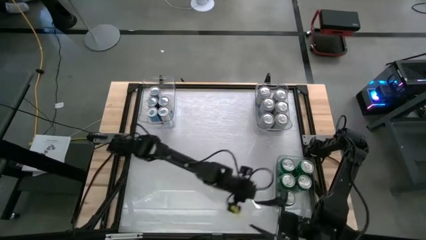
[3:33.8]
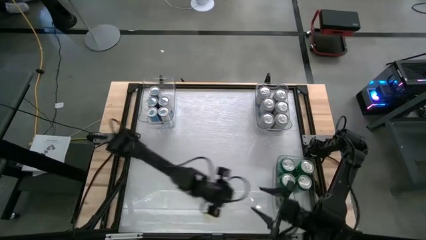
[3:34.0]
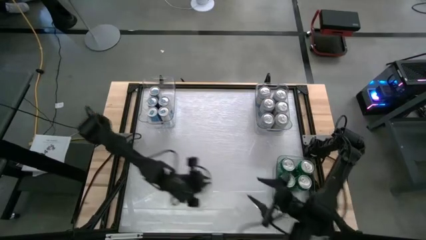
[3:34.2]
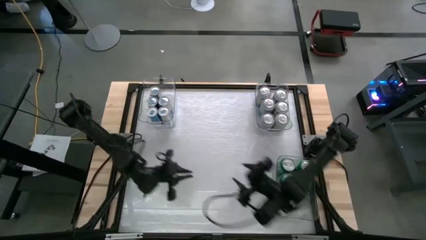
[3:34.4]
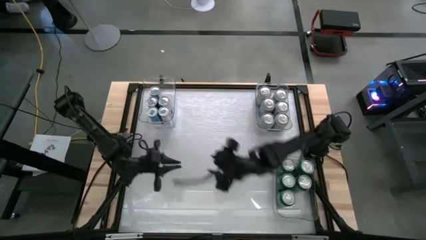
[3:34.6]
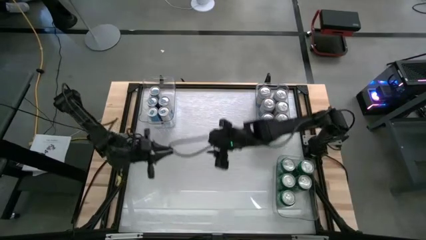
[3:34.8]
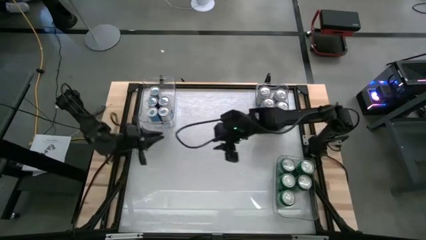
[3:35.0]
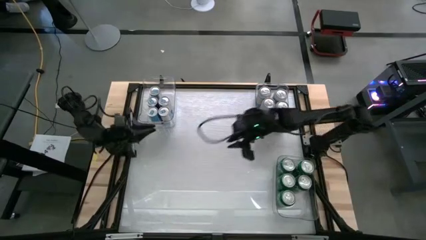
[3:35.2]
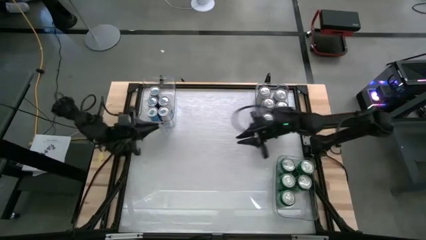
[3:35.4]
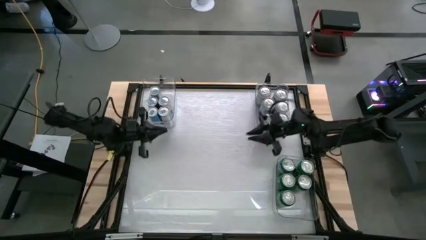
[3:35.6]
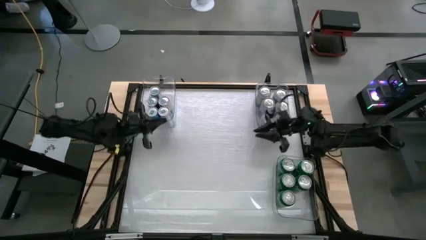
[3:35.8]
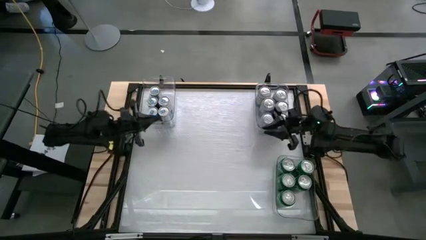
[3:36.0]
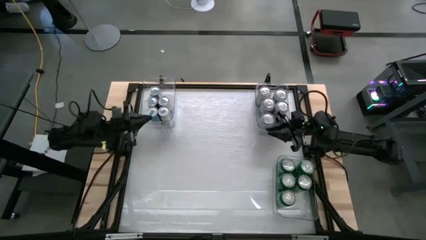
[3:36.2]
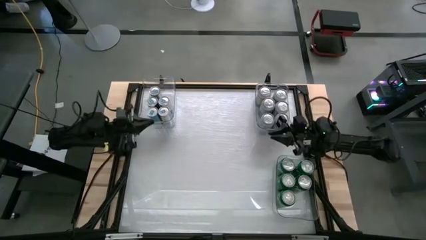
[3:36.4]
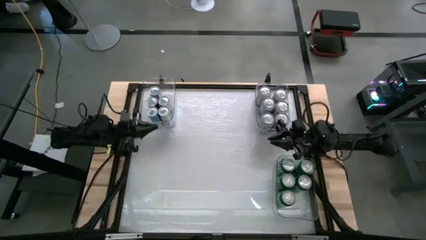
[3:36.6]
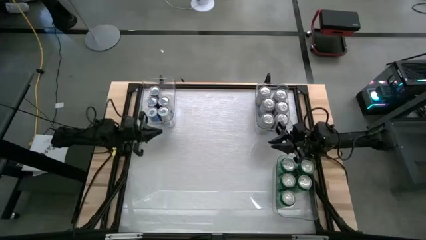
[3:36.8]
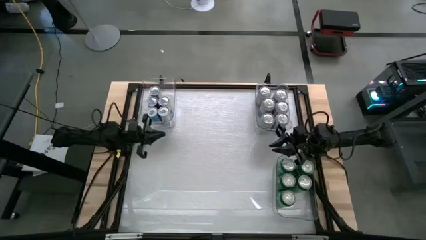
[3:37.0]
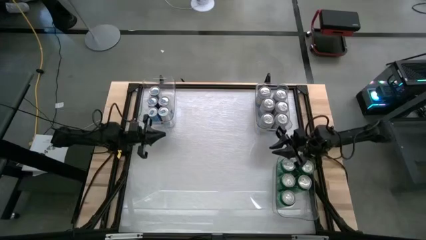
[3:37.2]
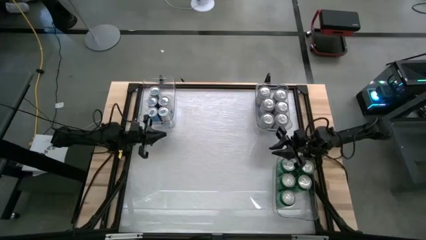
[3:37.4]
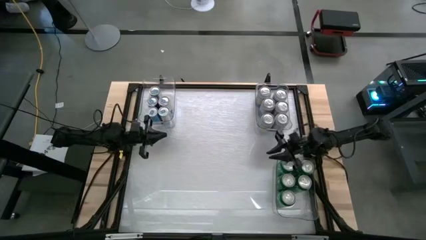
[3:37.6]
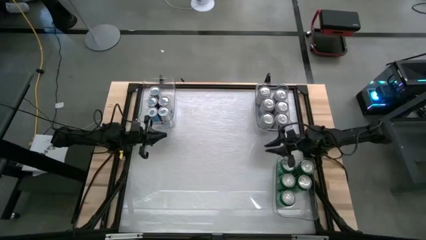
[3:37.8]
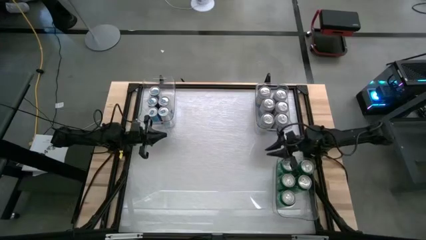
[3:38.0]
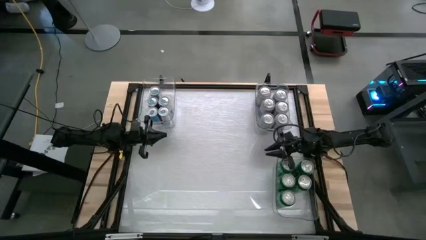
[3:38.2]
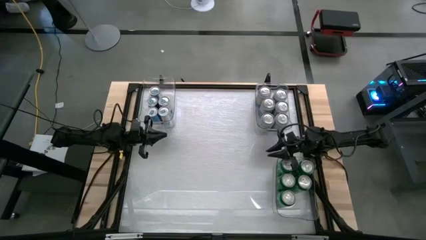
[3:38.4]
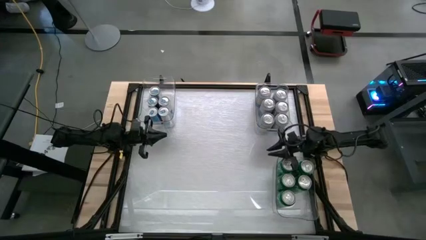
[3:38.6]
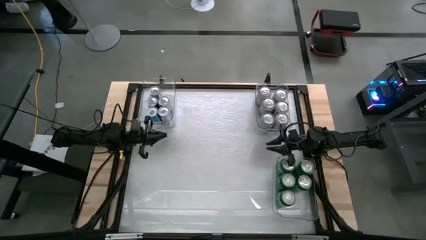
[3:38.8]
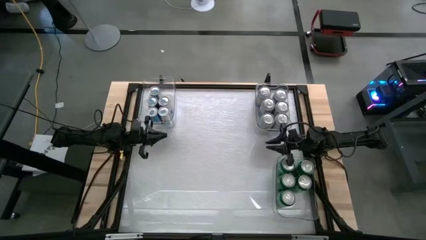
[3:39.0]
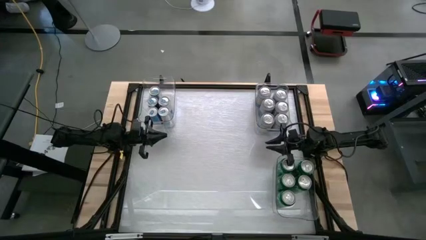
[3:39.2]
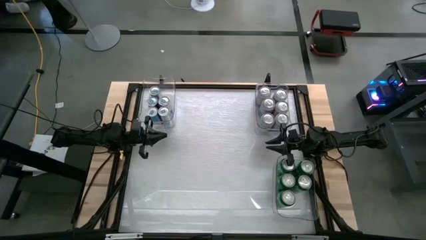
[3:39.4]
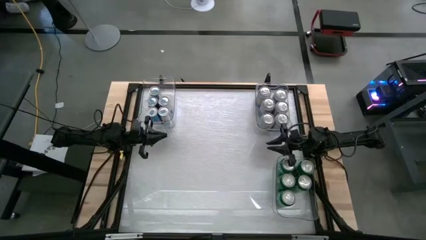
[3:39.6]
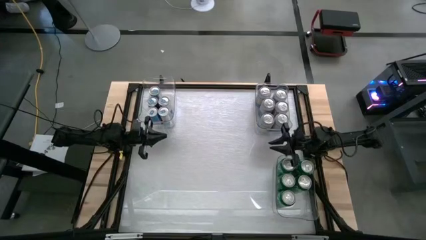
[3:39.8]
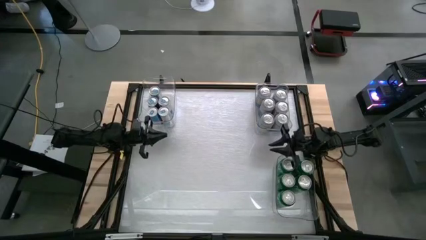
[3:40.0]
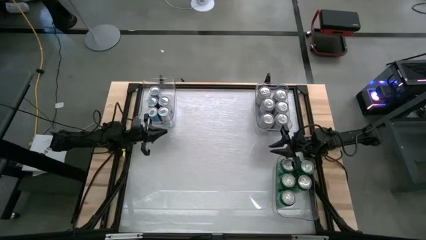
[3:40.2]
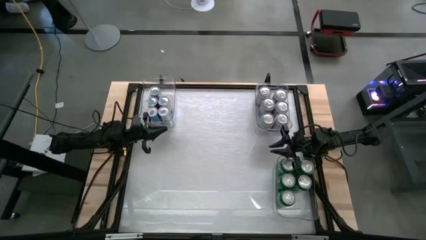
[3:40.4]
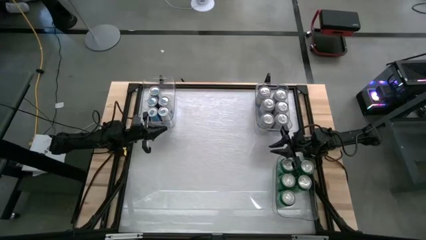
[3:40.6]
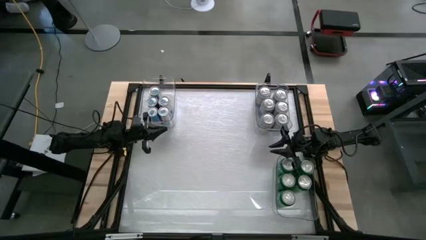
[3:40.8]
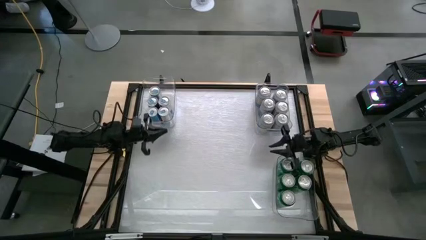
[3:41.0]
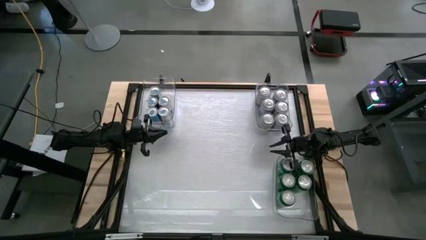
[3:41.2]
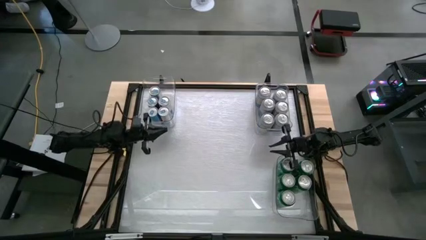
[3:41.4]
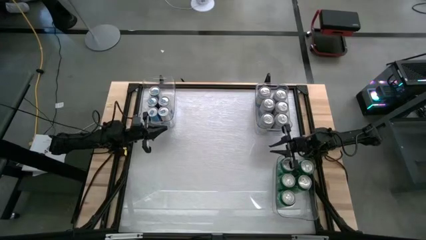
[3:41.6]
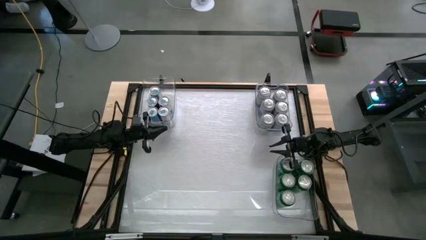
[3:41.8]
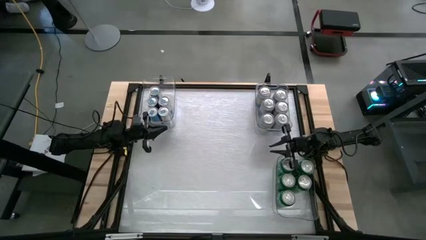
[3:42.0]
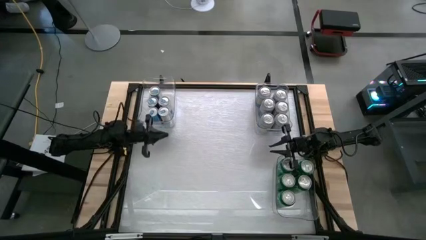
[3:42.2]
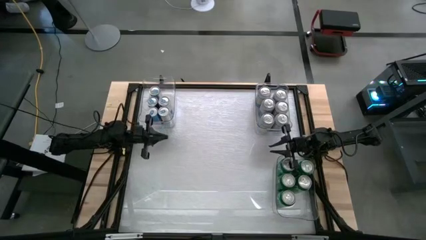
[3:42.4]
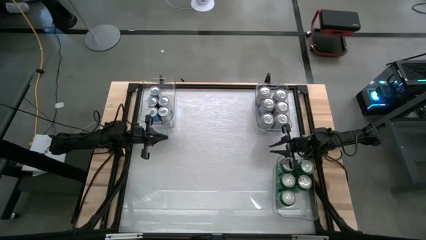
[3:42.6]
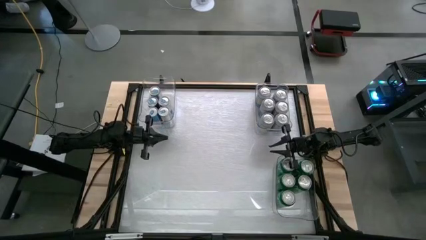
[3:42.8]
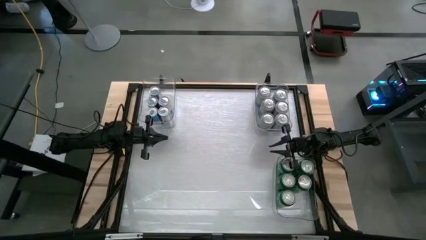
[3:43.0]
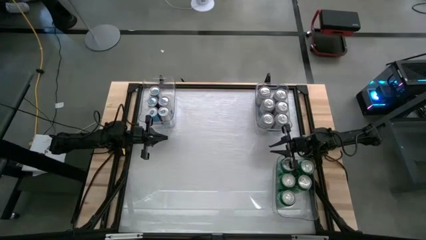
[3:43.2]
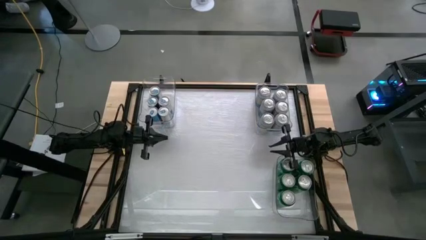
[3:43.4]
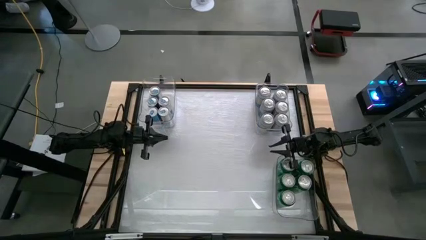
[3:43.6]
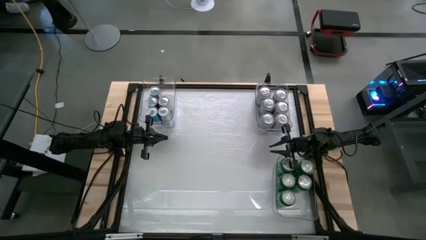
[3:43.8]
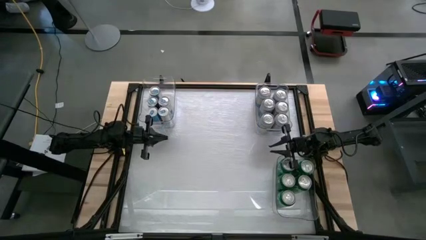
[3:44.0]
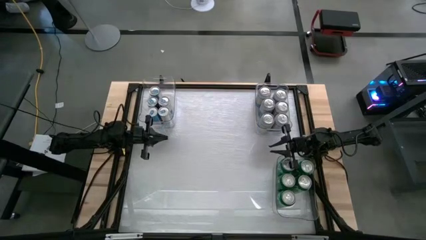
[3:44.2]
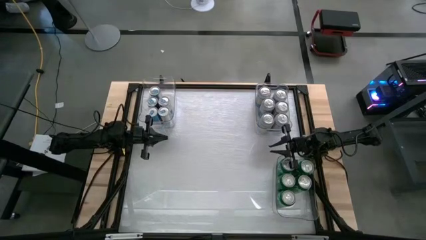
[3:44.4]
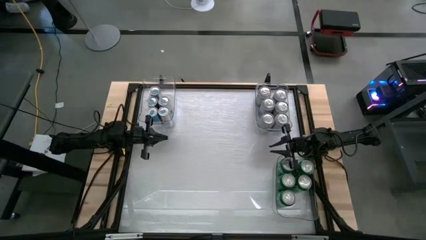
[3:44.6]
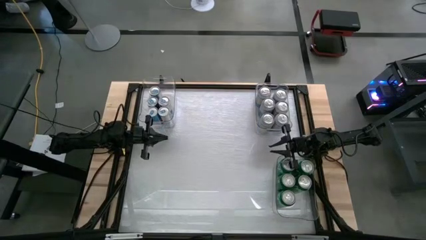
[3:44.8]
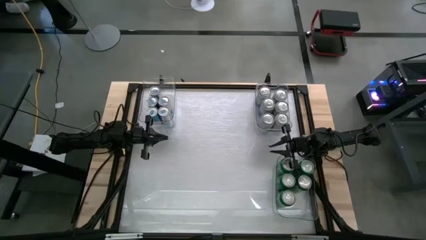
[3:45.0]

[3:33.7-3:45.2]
Task: Sort soda cans
Return to Home Position

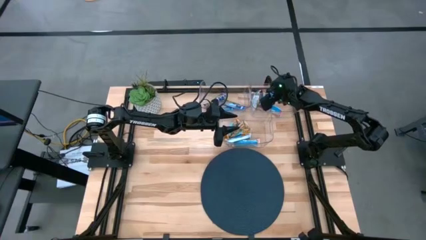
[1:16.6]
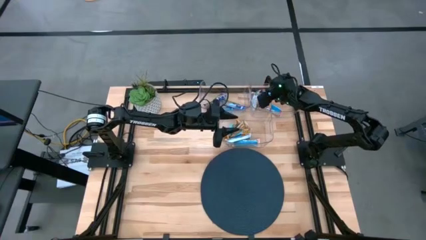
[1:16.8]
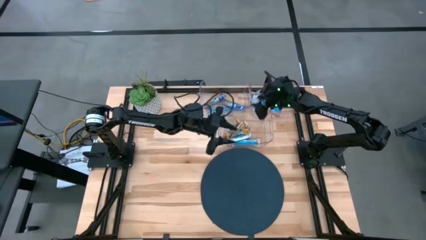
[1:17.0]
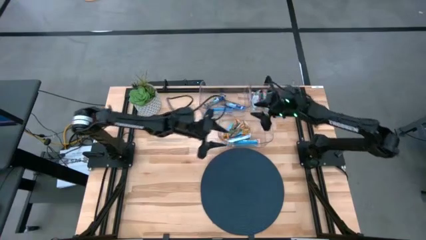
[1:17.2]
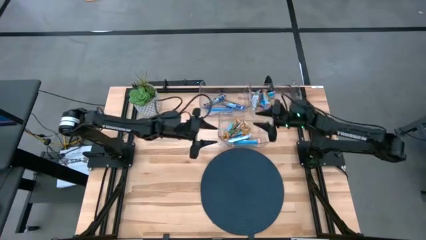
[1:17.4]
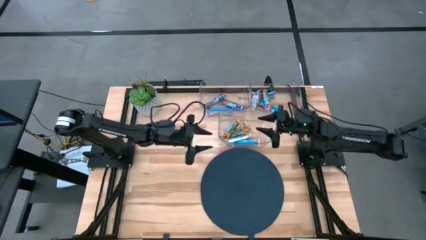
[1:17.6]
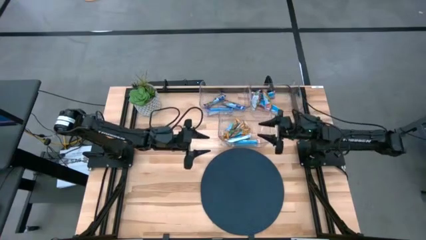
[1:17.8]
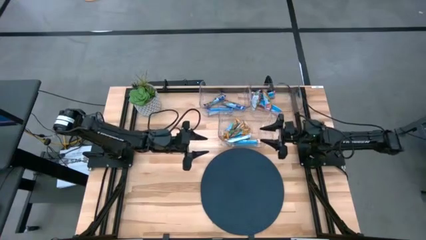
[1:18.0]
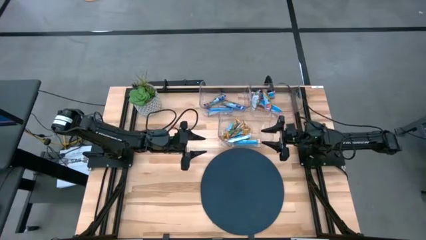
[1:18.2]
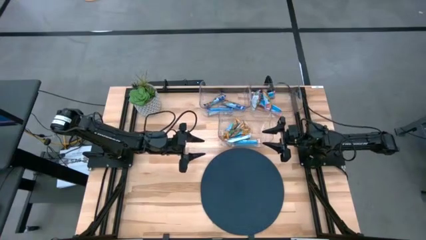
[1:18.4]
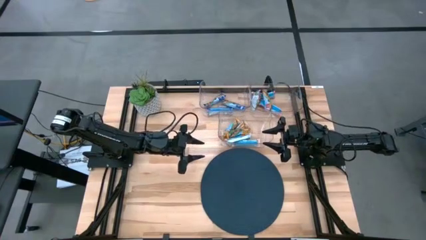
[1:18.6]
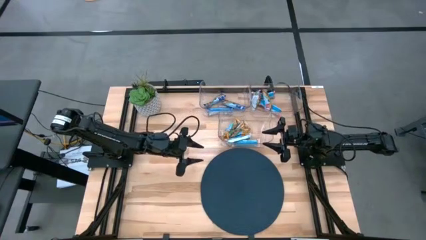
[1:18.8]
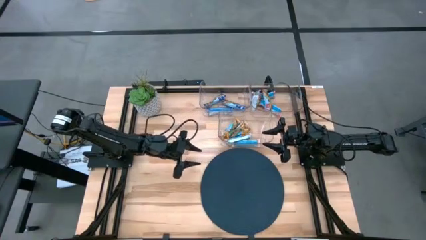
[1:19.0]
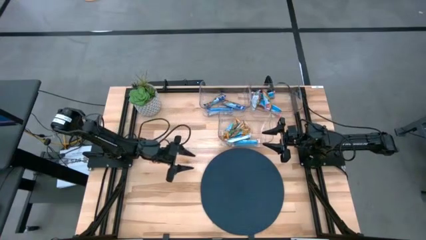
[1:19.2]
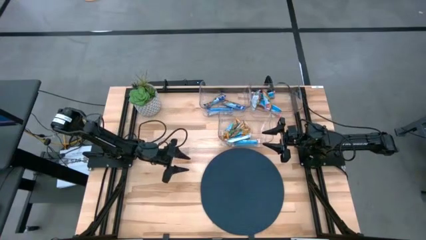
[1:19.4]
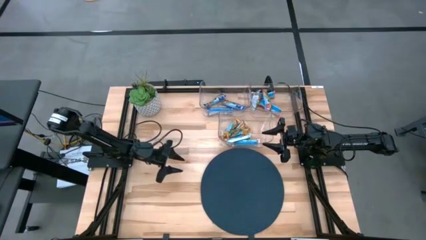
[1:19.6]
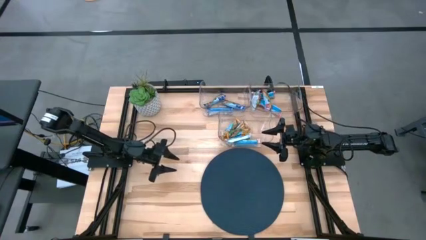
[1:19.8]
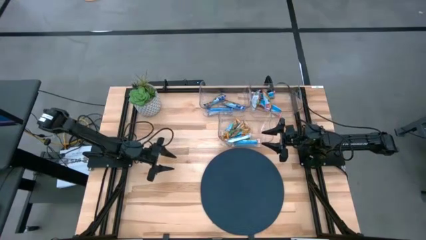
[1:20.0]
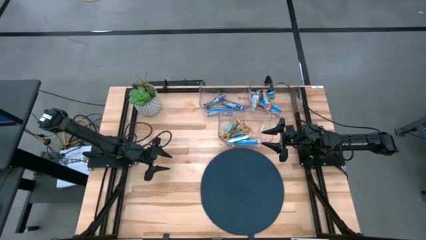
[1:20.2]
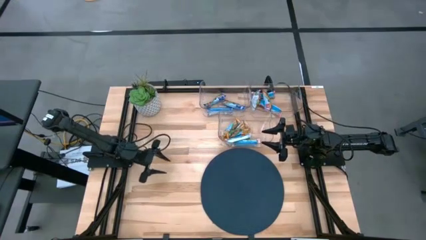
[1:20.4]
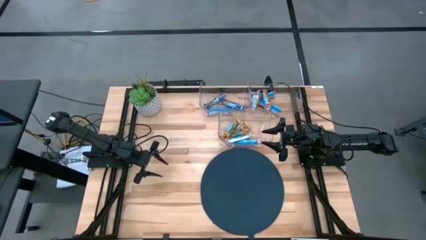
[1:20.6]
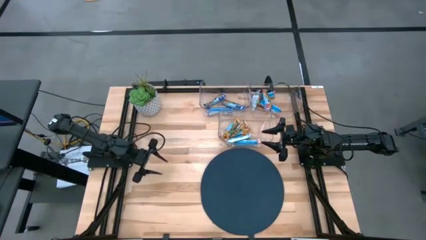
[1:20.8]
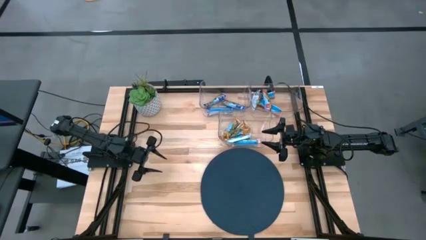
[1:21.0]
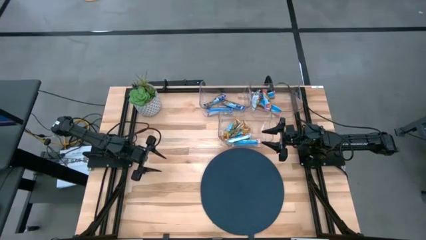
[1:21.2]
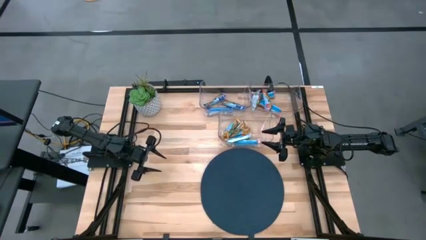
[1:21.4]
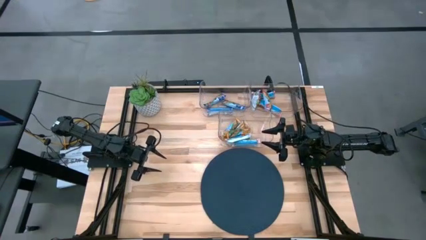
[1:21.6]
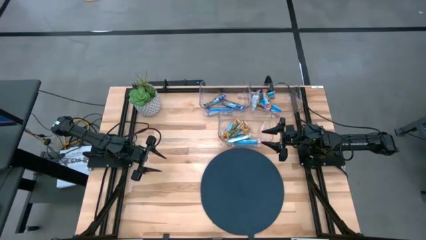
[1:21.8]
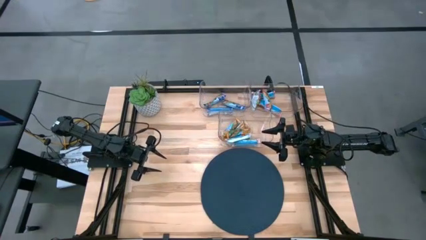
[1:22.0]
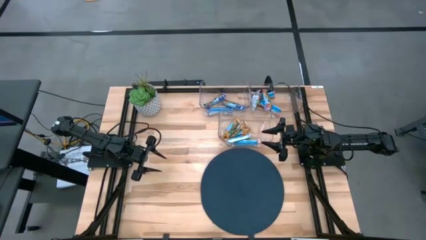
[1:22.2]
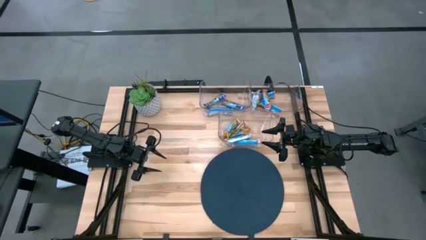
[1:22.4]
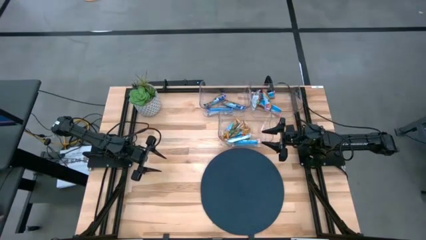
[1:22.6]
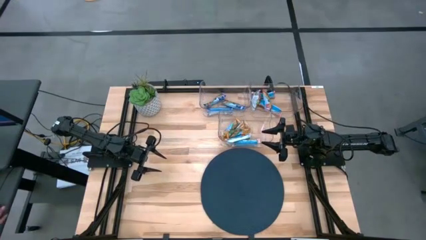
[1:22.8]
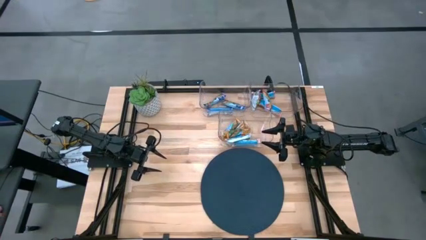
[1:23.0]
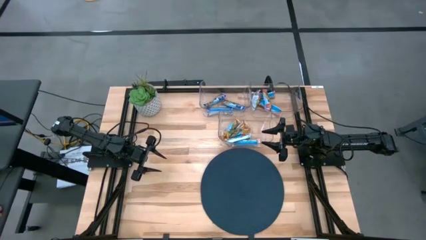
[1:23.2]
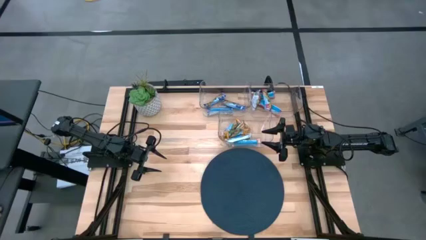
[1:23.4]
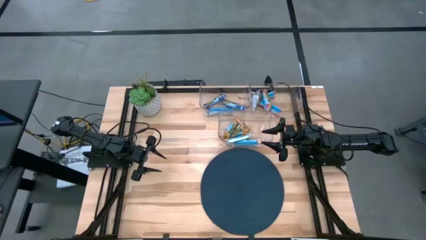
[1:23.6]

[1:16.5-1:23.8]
Task: Pick and place Granola Bars by type
Return to Home Position
